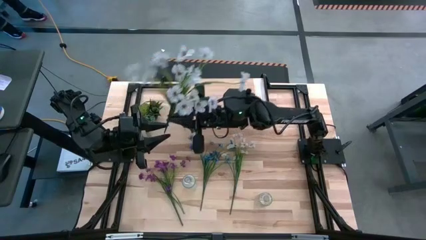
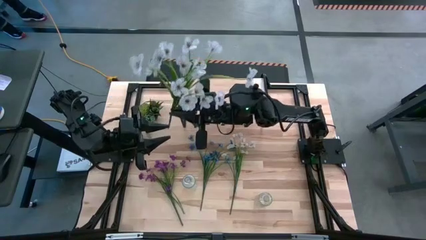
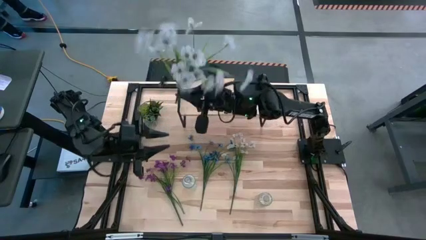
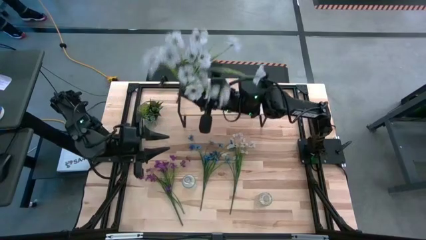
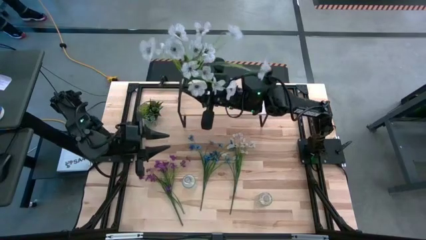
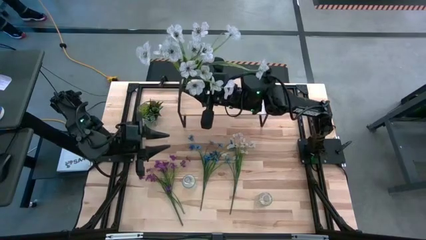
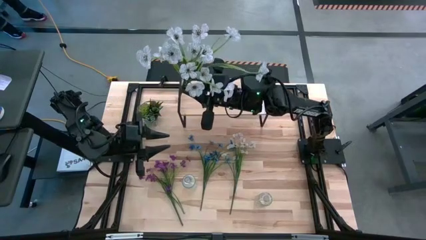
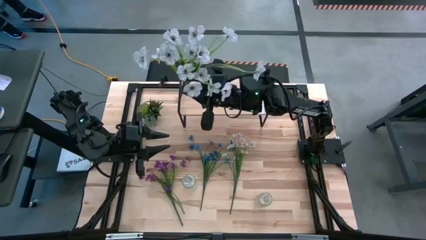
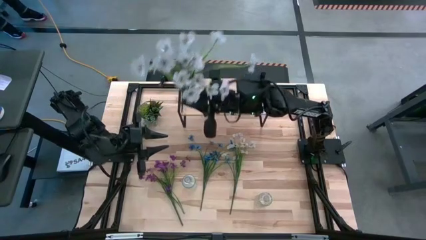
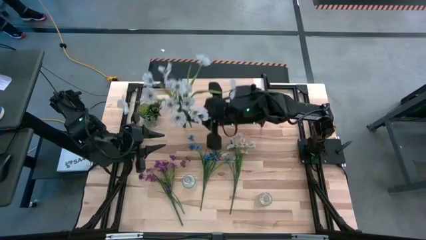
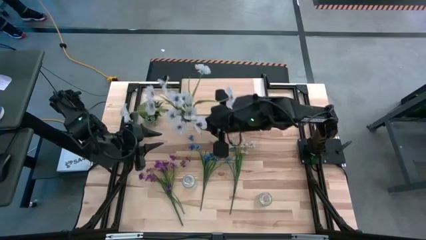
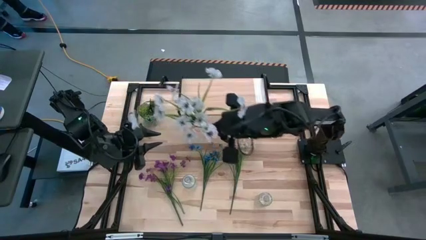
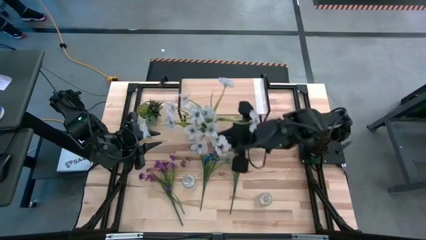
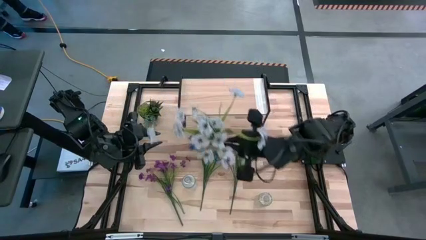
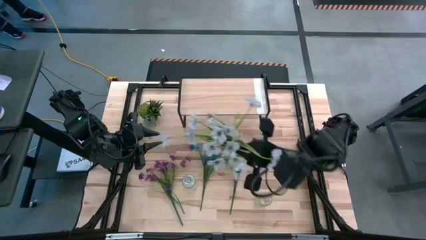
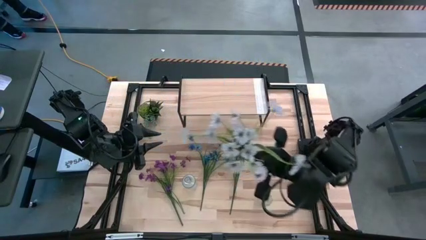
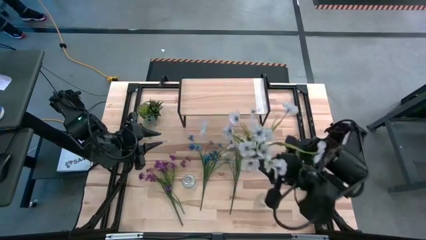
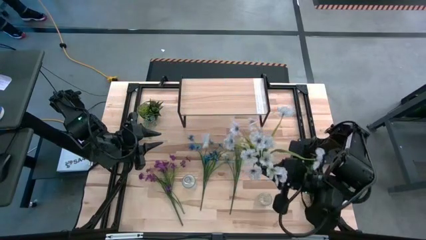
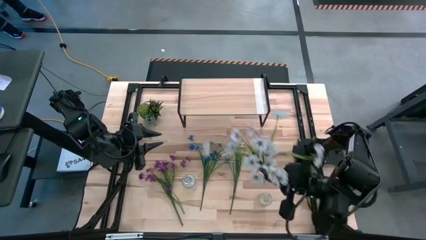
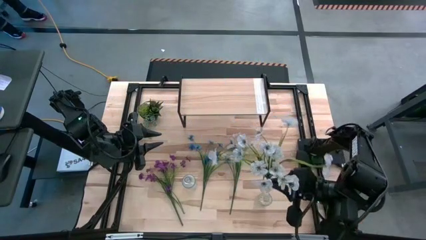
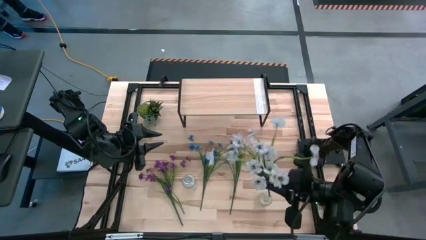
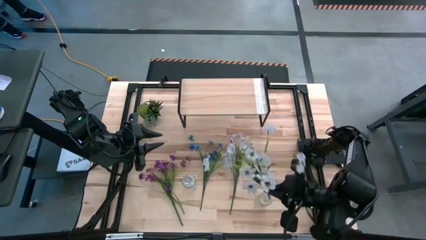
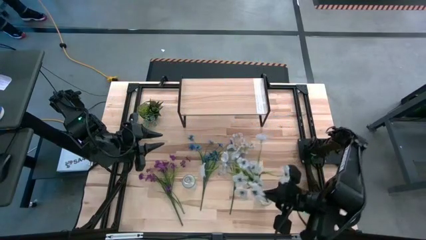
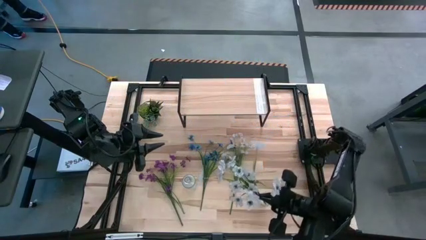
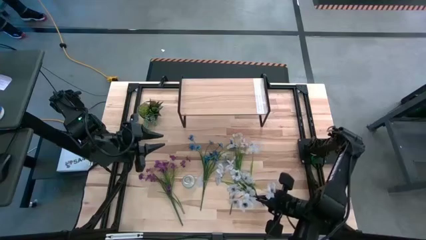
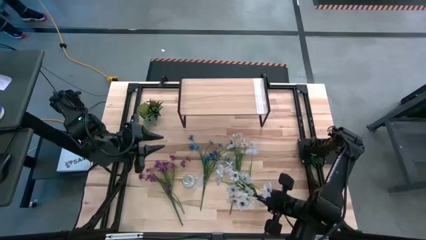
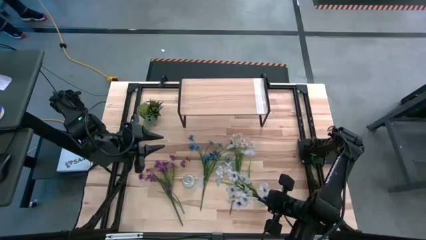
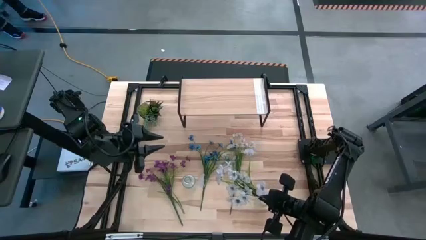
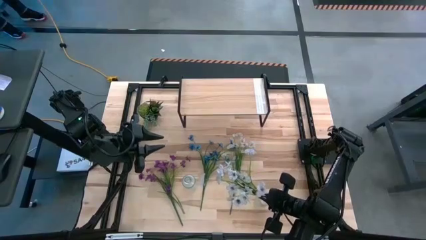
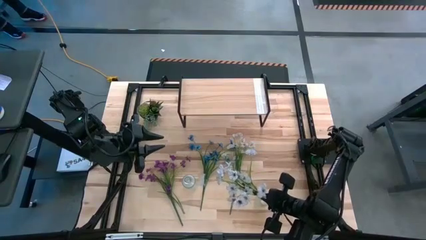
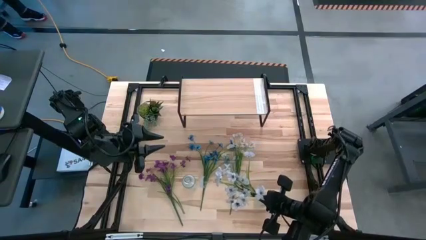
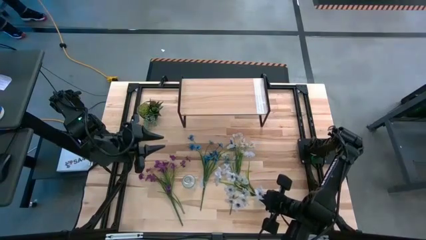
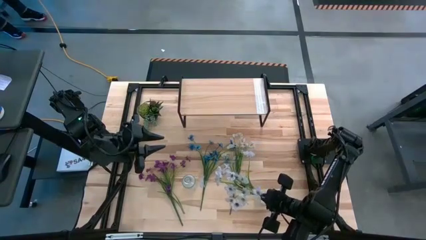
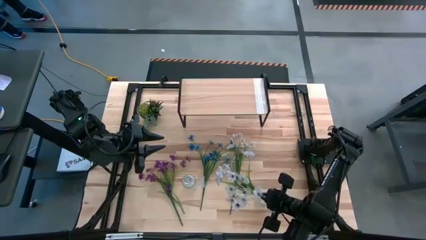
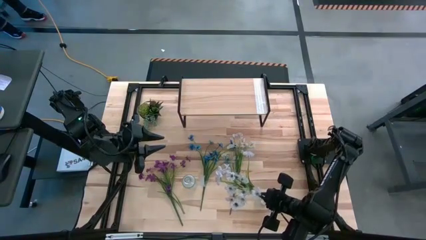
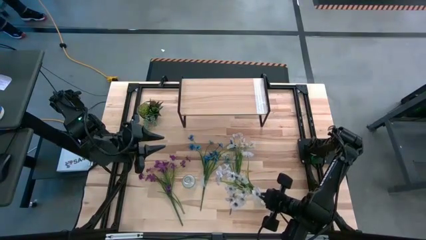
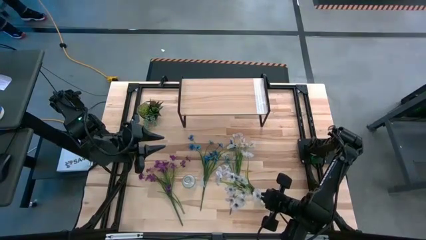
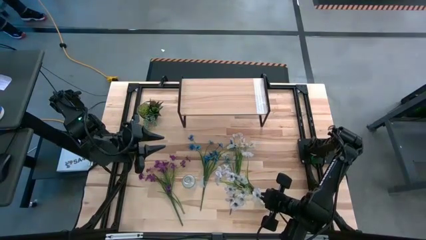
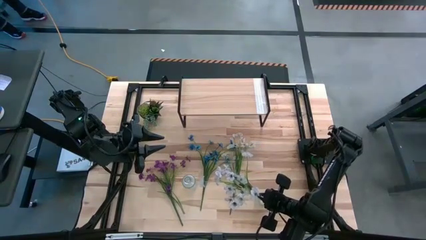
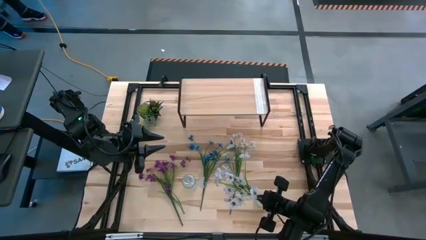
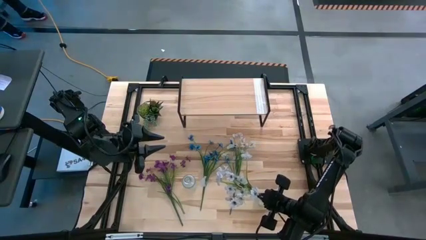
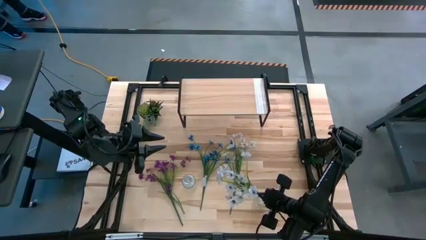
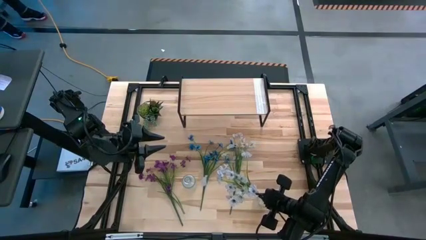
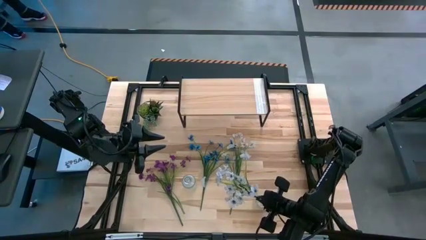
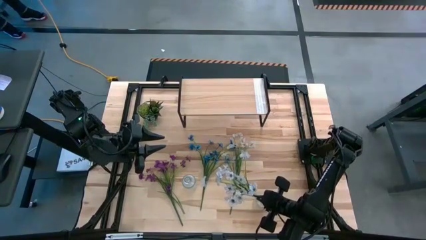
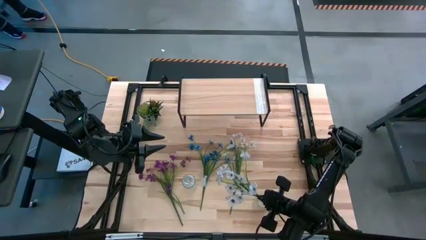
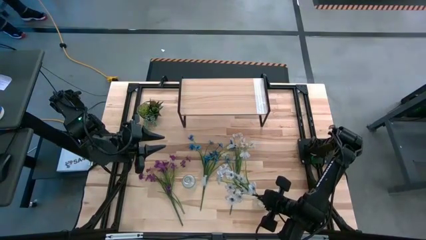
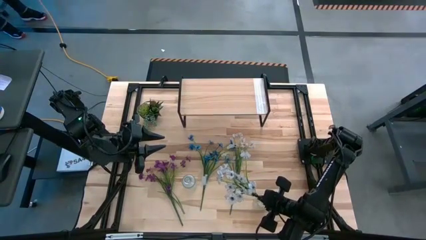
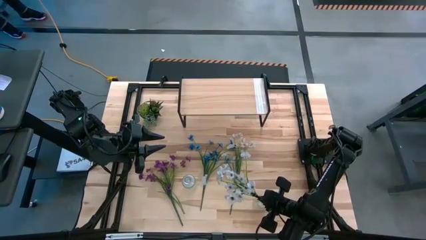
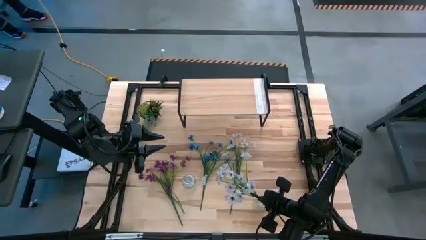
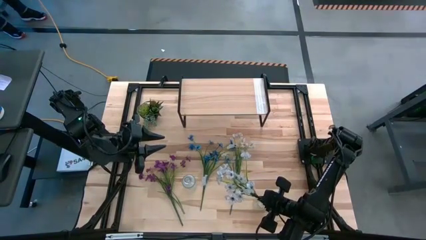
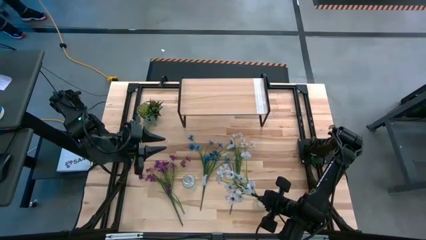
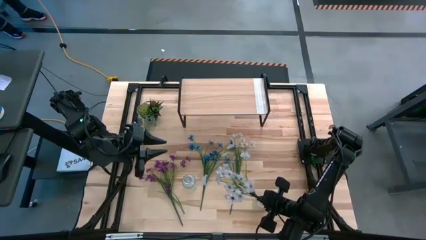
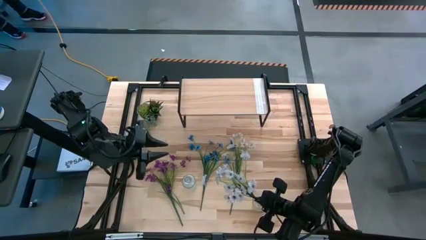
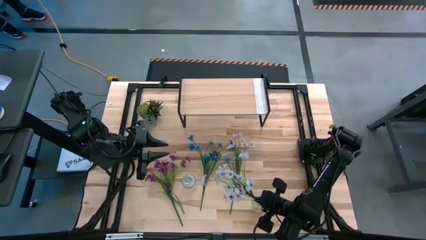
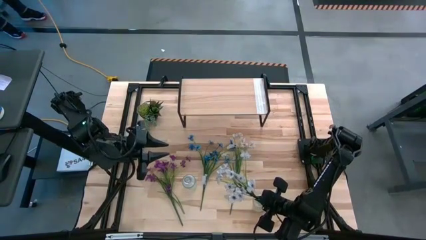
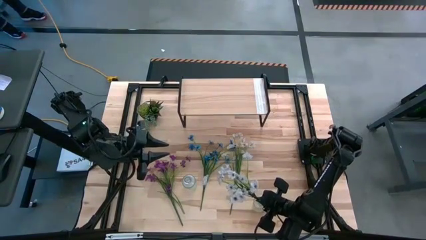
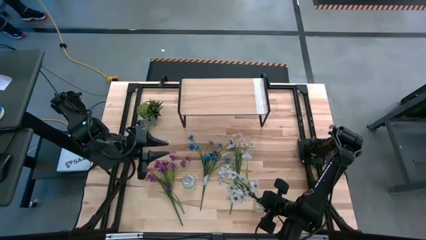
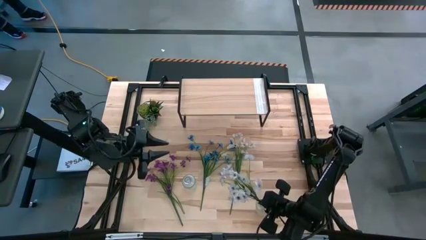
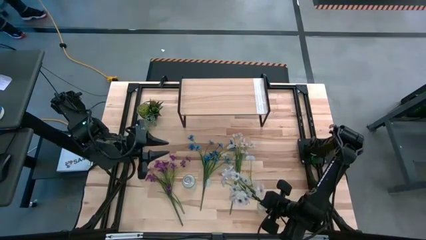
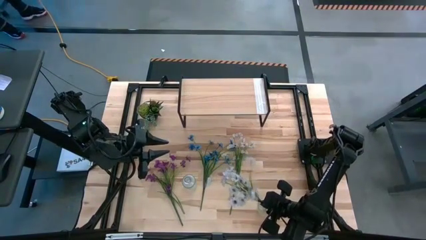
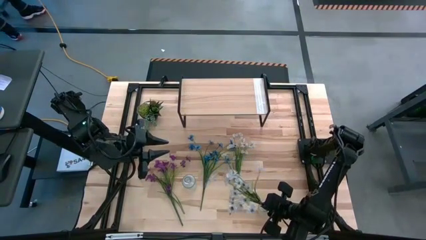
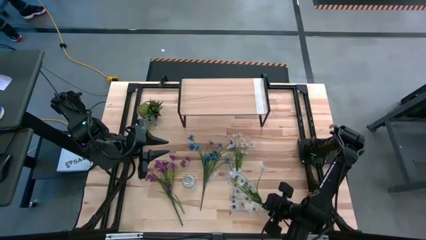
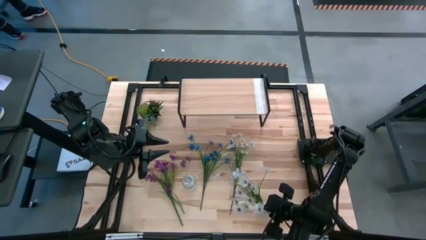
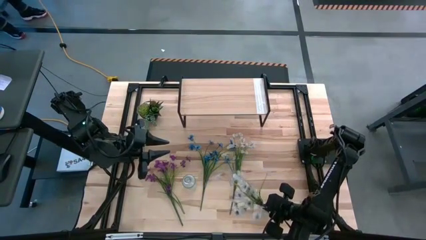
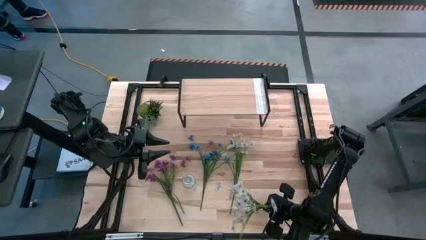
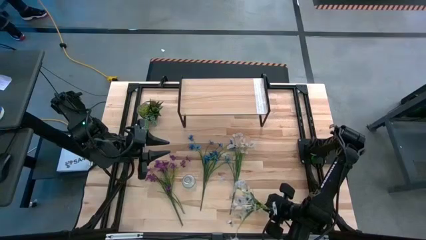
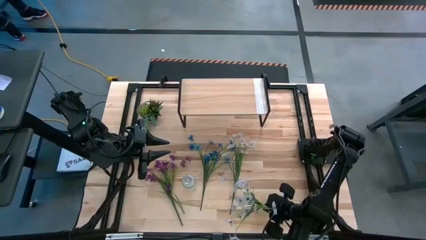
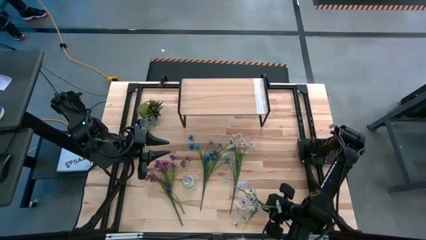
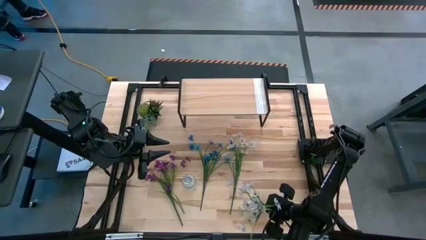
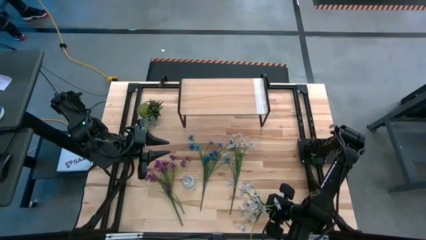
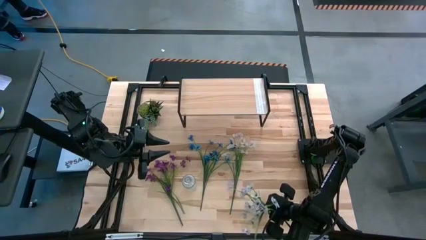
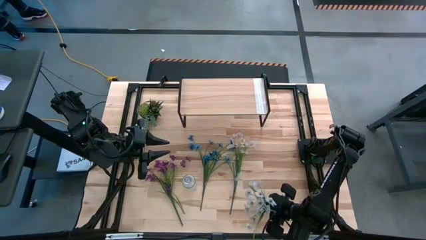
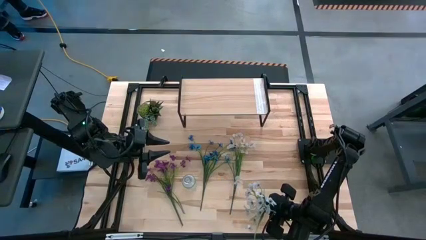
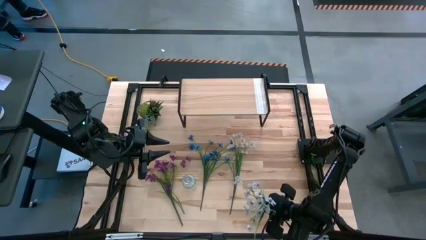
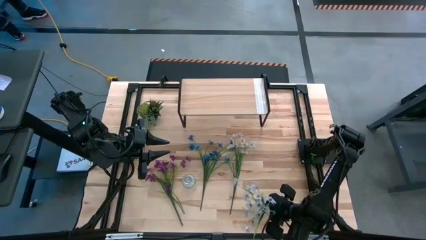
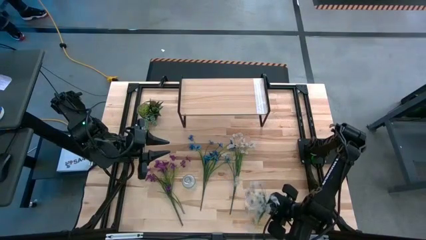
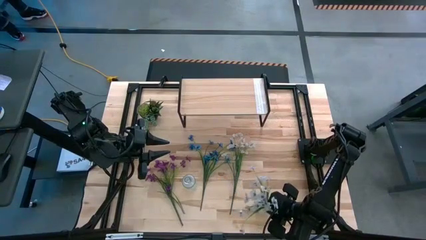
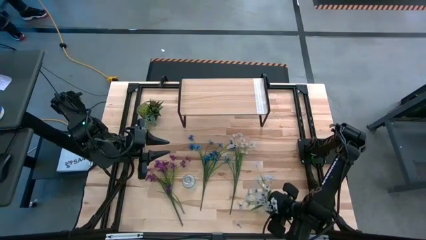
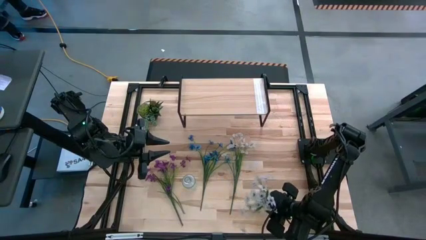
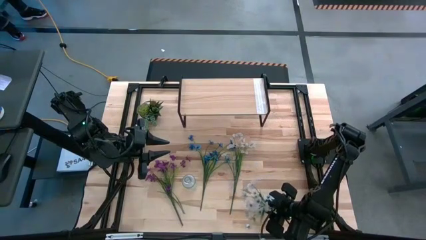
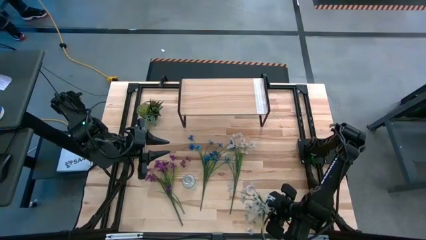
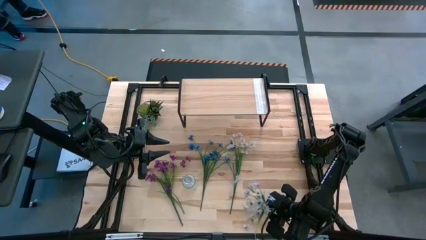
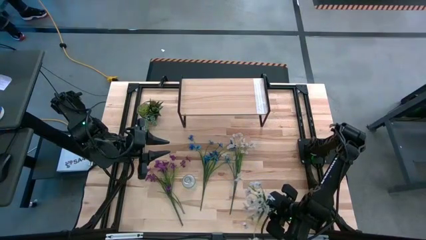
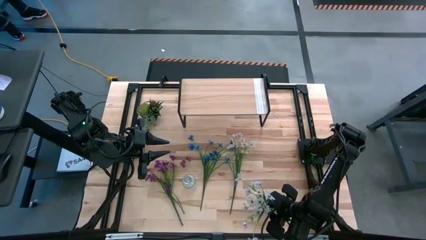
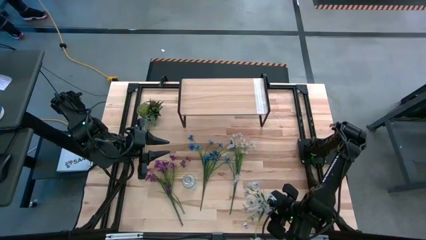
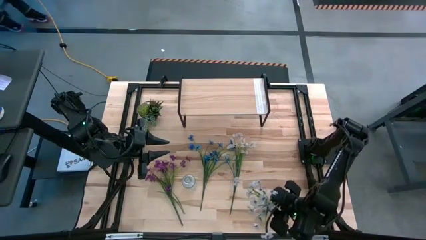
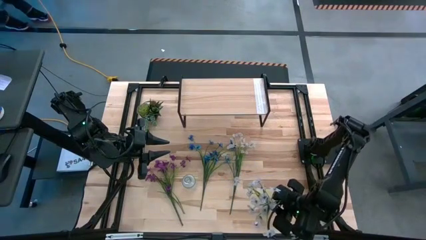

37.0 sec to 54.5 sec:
Task: Pick and place flowers into a vace then onto a shelf
Put the left white flowers into the right transparent vase
